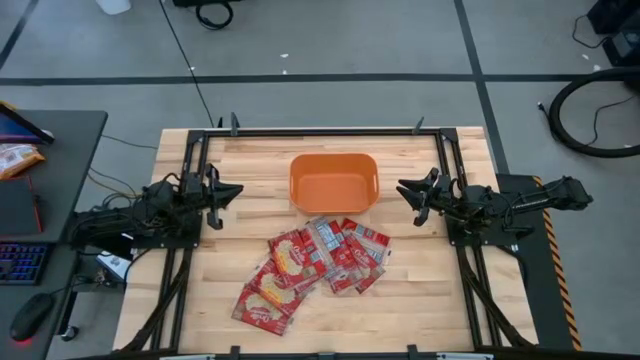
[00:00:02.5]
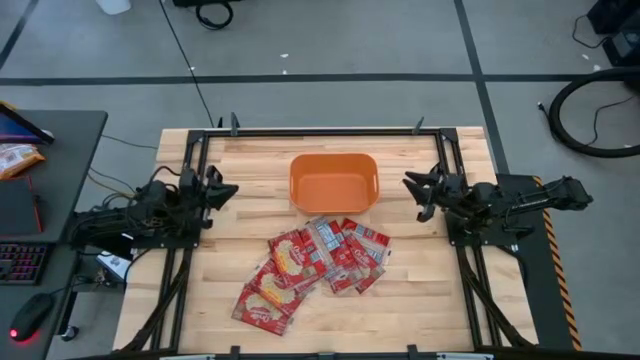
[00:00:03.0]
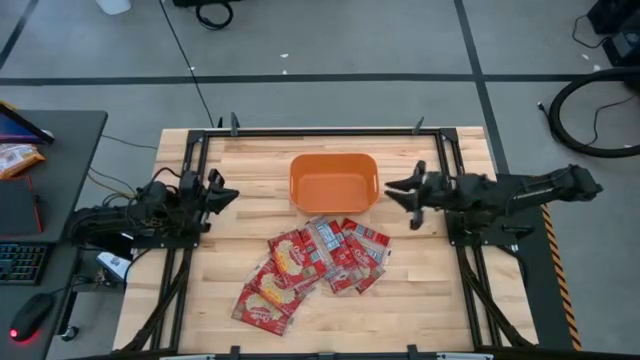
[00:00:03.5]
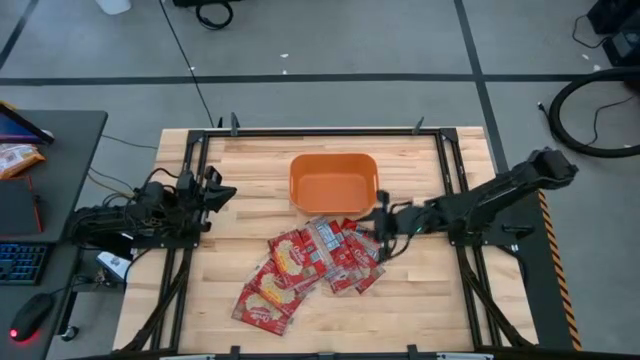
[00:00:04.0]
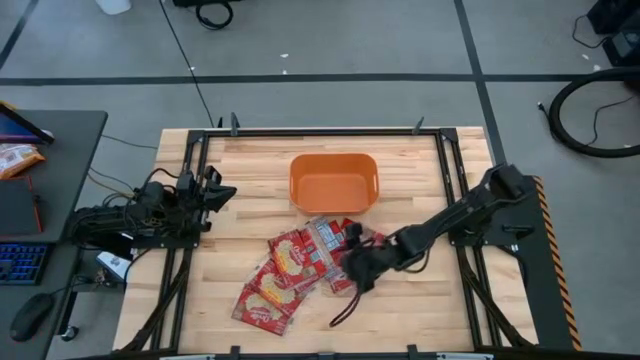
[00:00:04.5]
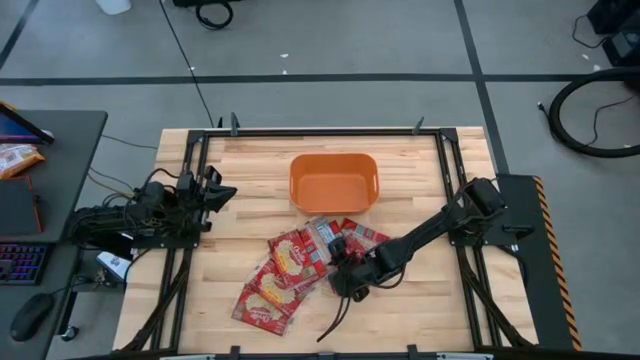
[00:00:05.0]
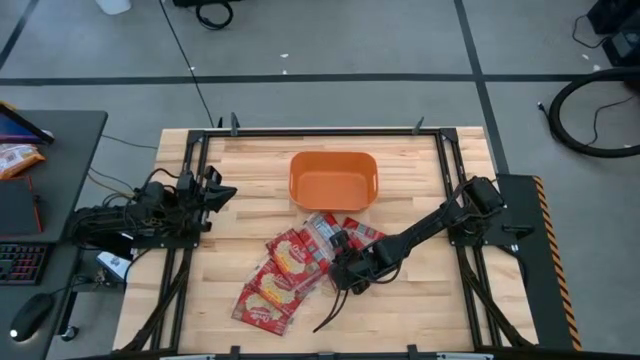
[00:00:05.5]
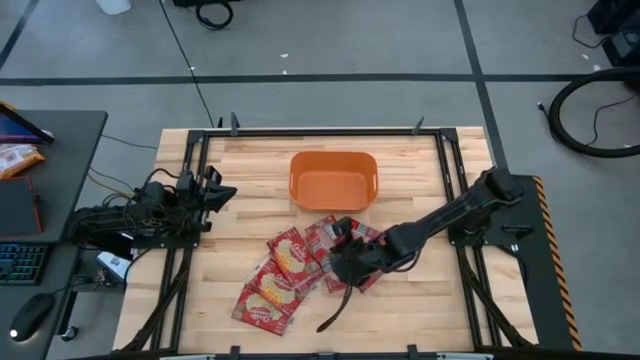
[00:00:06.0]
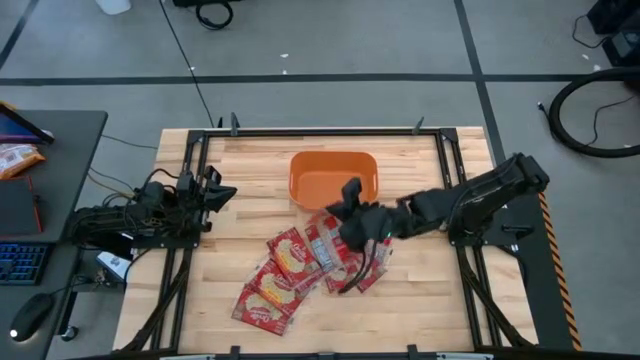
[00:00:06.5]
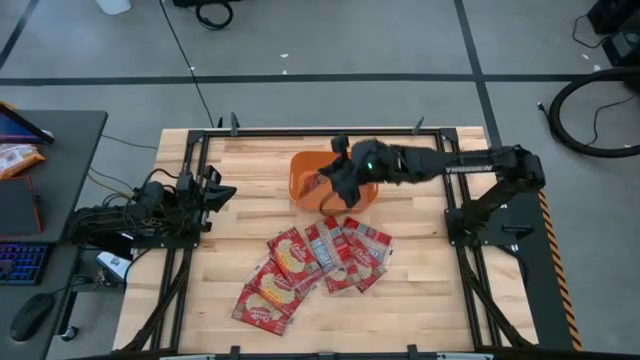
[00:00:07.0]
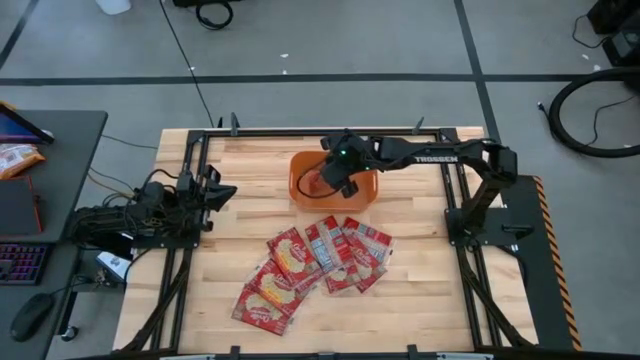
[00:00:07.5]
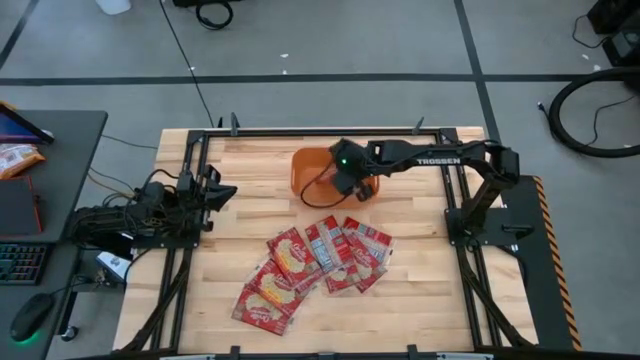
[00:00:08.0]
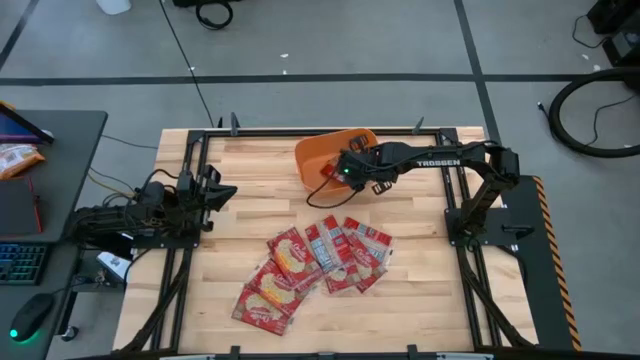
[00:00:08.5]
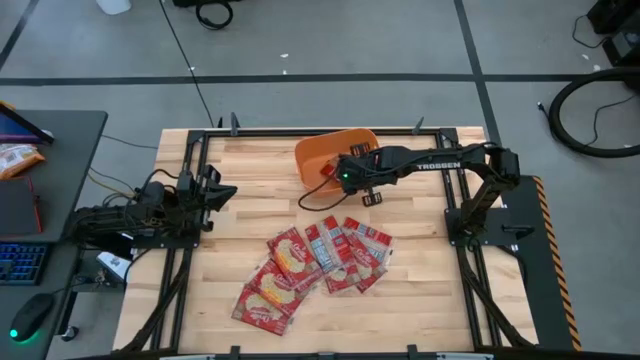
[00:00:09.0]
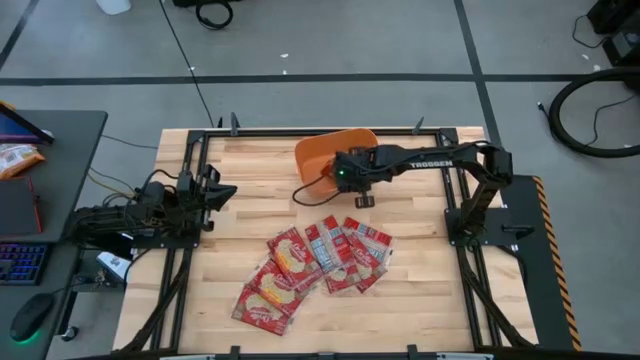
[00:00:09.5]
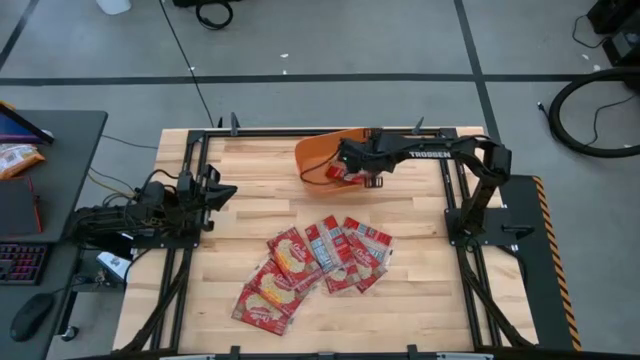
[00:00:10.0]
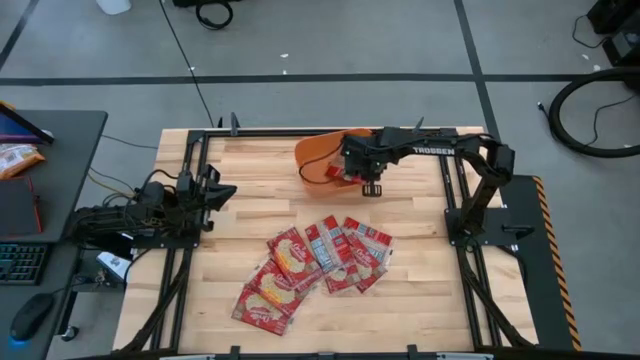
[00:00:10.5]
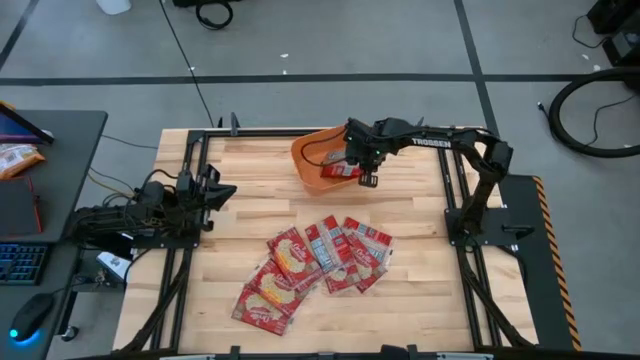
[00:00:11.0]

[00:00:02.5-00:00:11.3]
Task: Sort popcorn bags into baskets
Put the red popcorn bag into the orange bin

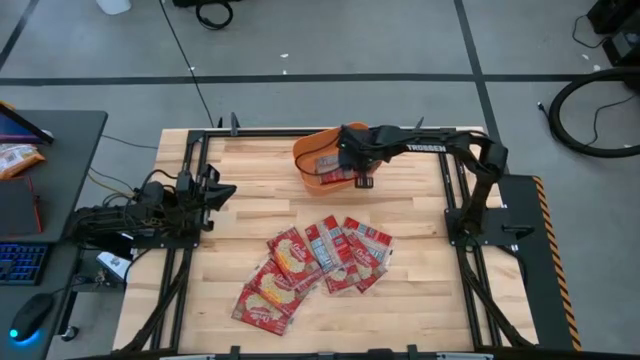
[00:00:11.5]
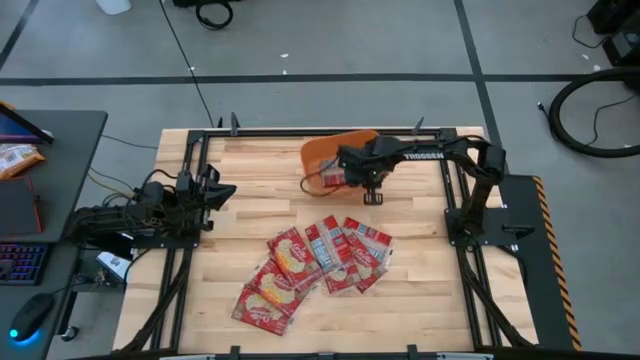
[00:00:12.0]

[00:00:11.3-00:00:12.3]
Adjust the orange bin on the table

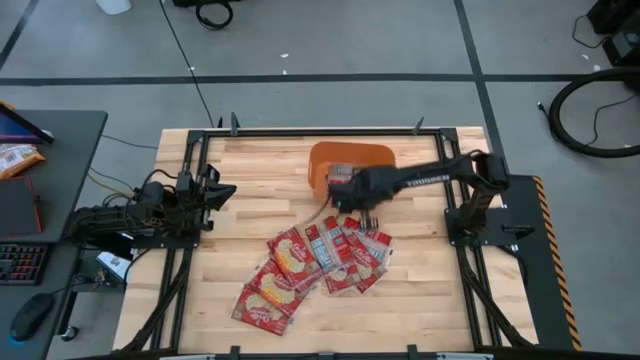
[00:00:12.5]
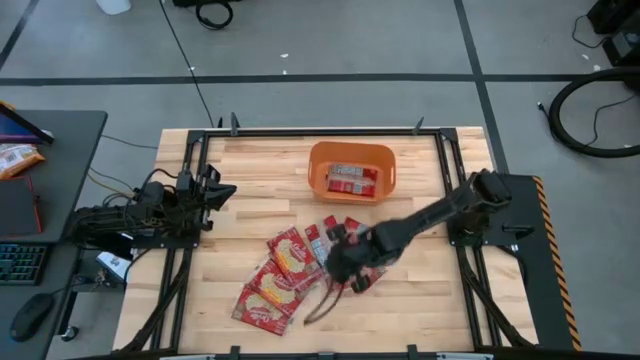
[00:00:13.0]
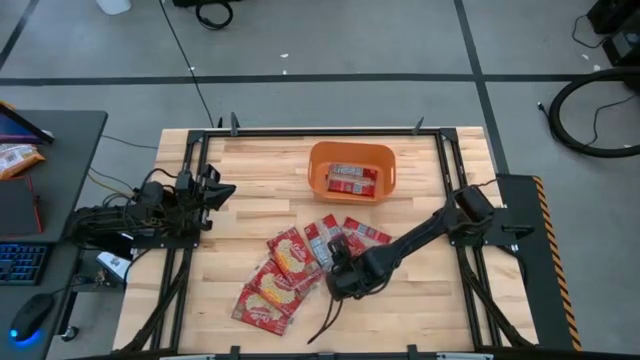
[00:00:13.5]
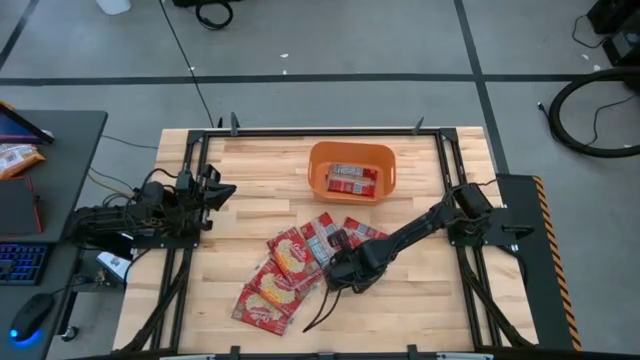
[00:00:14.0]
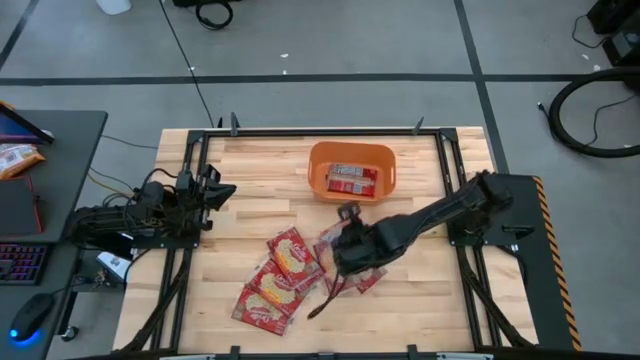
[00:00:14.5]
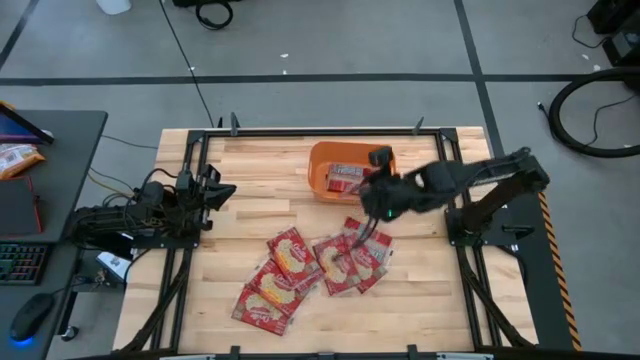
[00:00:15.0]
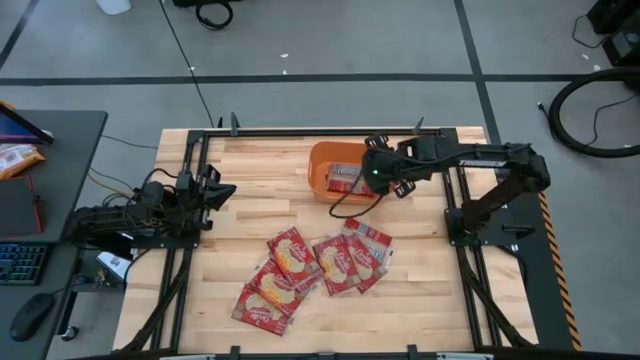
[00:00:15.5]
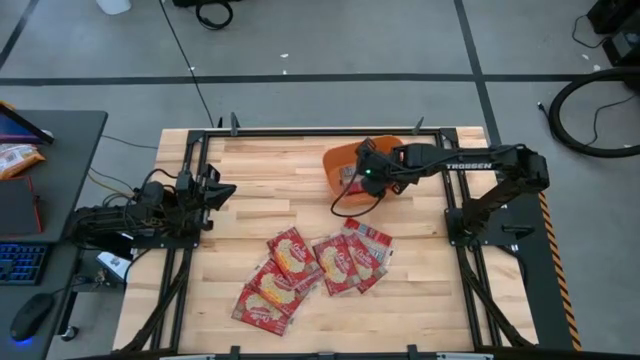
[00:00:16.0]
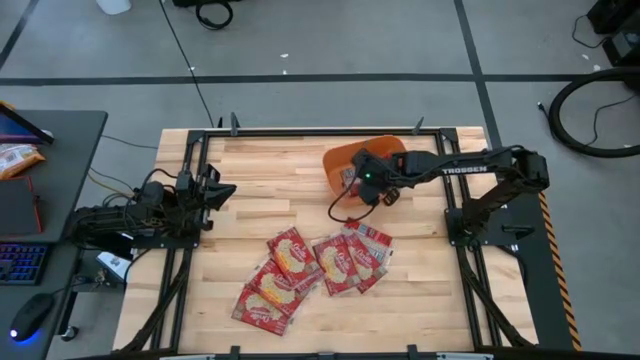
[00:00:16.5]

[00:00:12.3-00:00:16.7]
Put the red popcorn bag into the orange bin

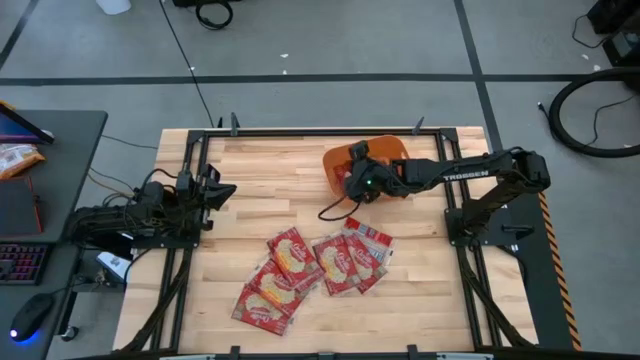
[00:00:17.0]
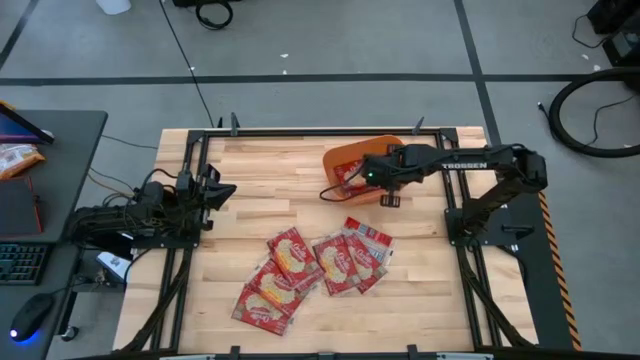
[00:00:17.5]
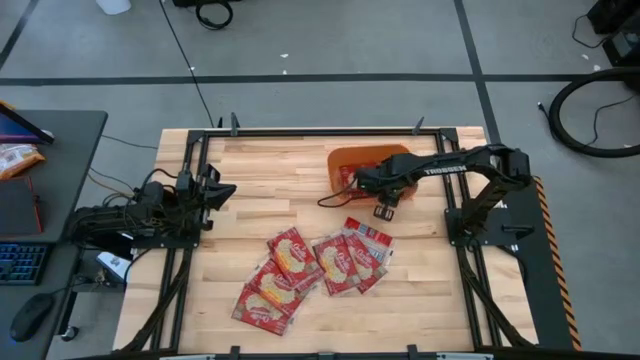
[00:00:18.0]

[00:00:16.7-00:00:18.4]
Adjust the orange bin on the table

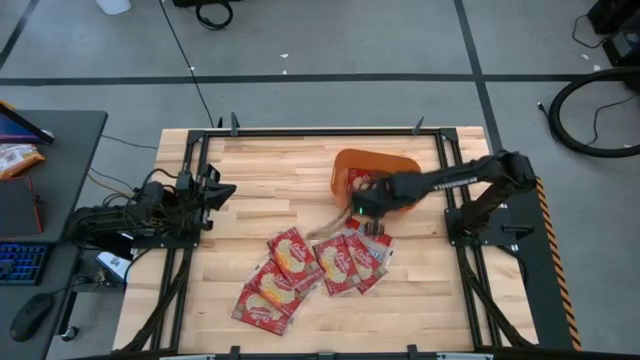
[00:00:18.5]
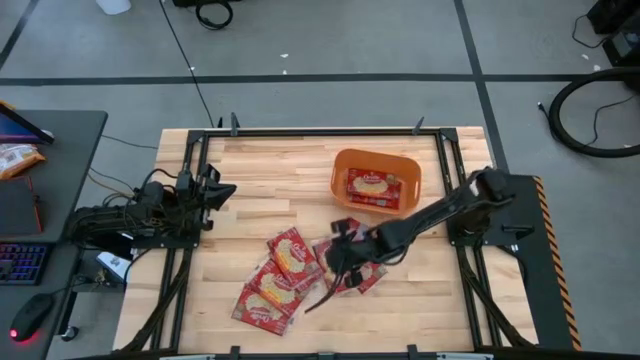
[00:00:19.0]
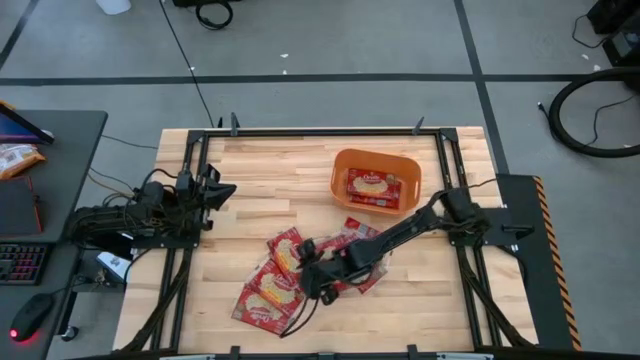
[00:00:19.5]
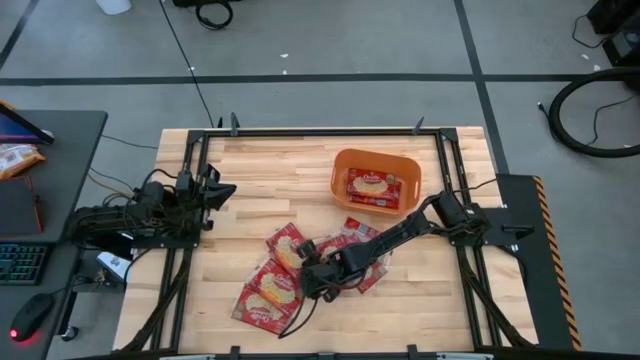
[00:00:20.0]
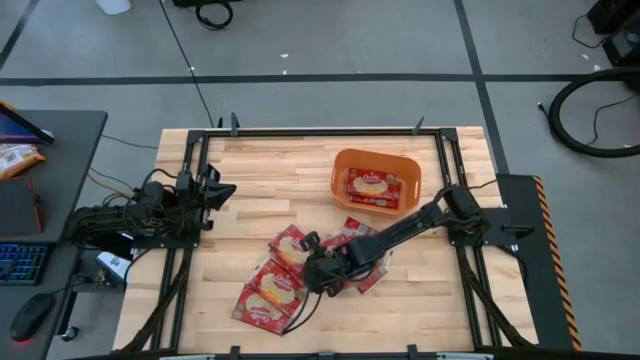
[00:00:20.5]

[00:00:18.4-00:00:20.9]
Put the red popcorn bag into the orange bin

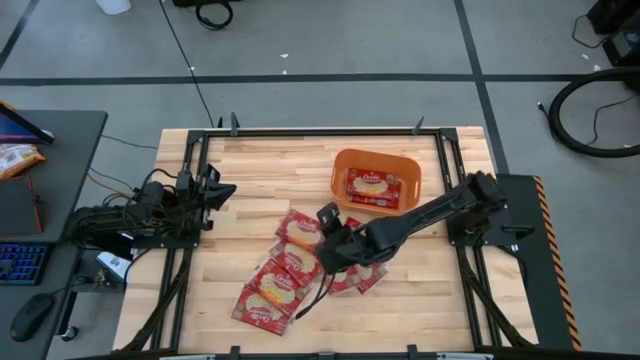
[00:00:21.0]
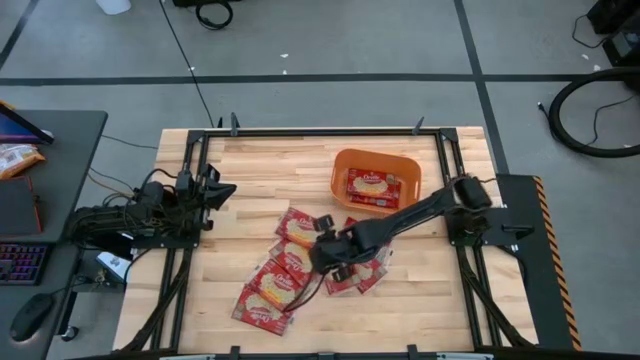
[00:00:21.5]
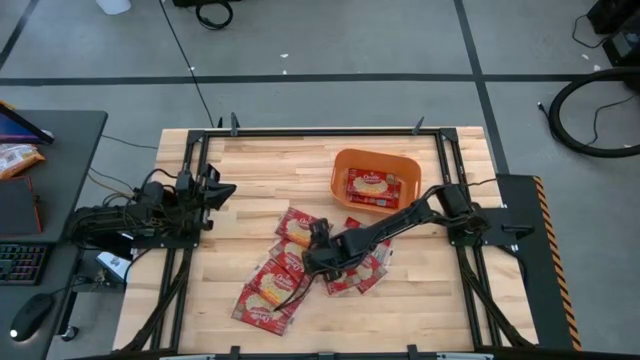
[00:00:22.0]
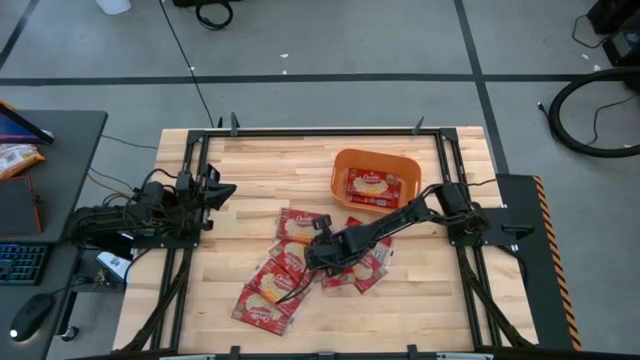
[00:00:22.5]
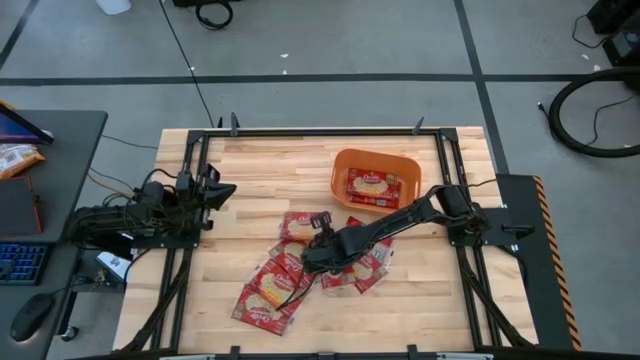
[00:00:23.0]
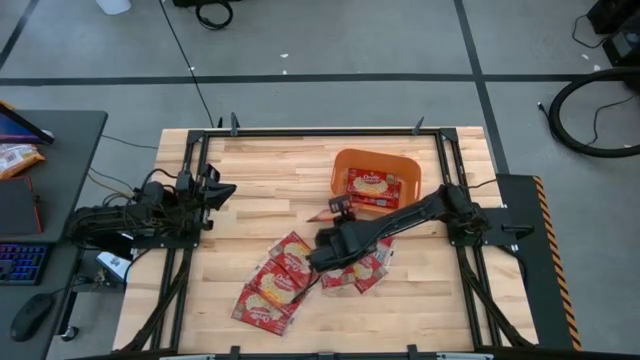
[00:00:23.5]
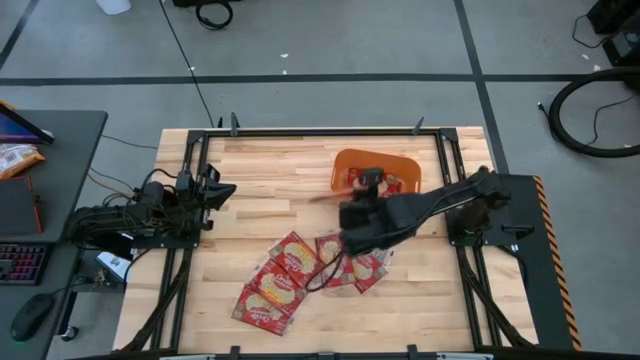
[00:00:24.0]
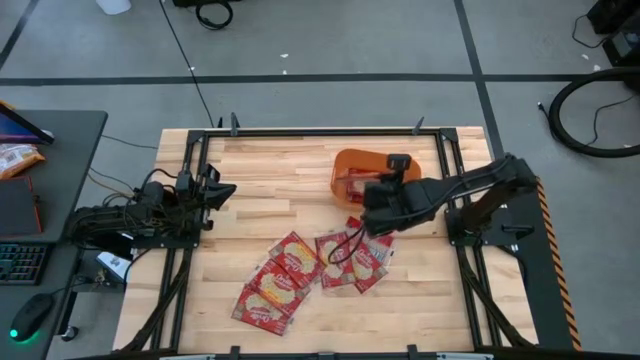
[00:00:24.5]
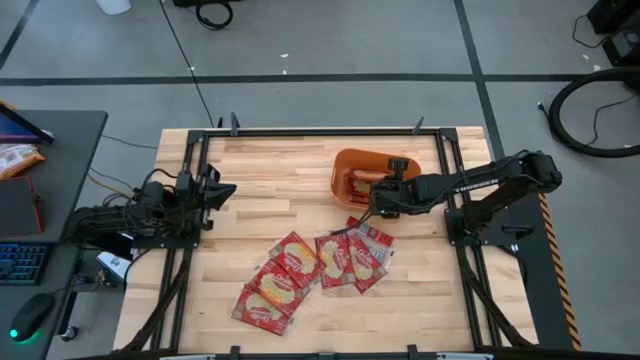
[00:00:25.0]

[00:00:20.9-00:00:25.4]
Put the red popcorn bag into the orange bin
